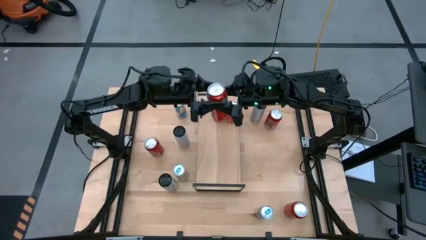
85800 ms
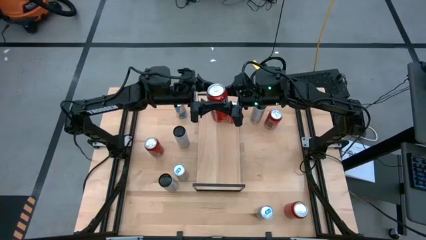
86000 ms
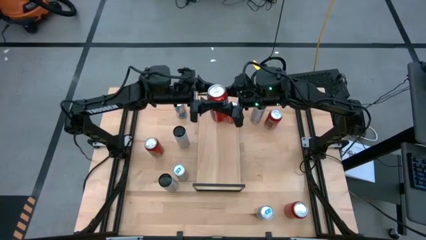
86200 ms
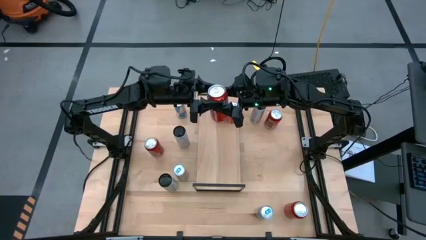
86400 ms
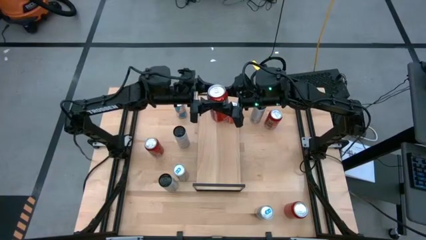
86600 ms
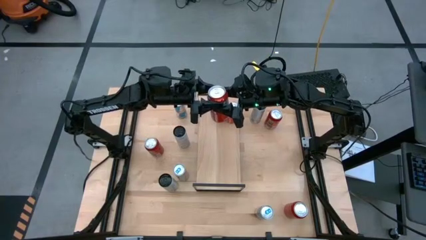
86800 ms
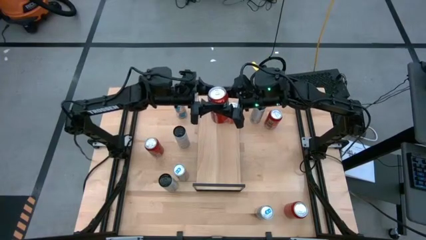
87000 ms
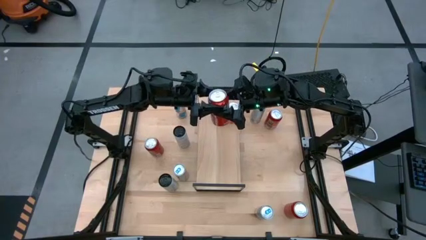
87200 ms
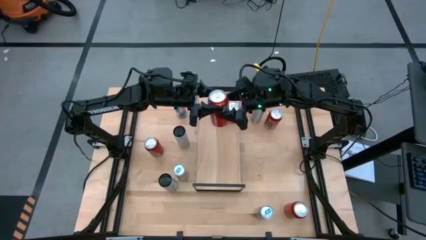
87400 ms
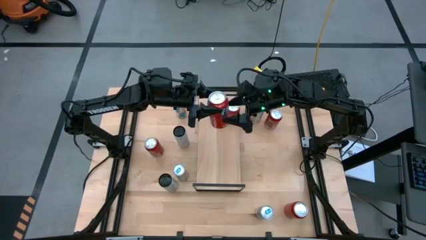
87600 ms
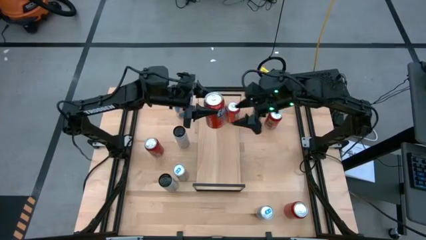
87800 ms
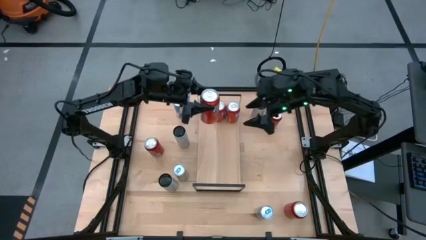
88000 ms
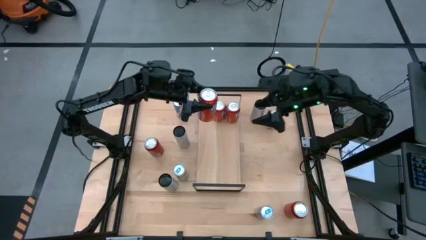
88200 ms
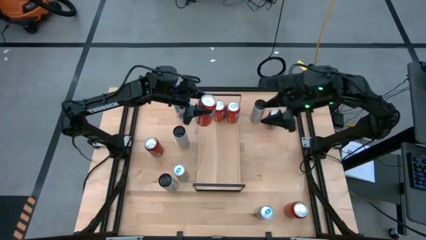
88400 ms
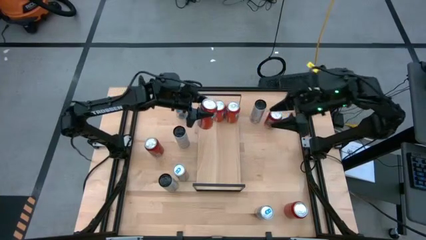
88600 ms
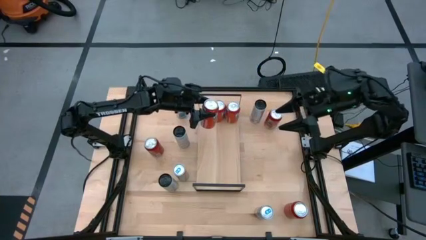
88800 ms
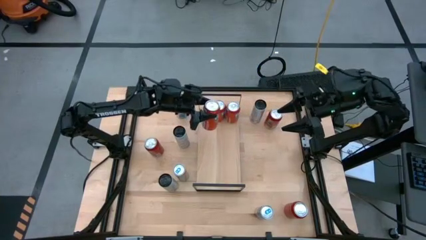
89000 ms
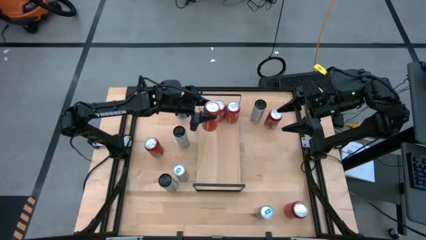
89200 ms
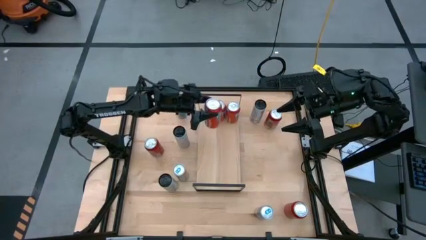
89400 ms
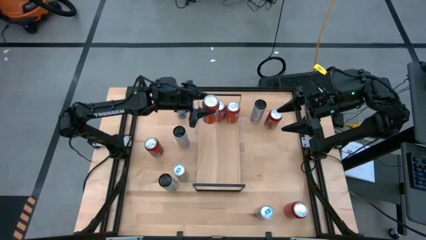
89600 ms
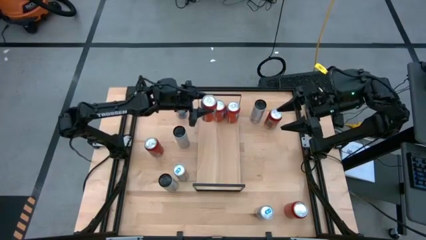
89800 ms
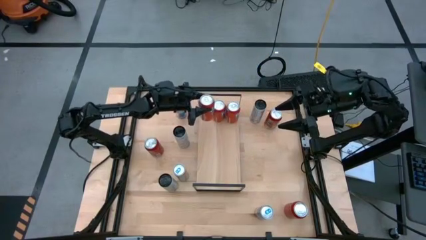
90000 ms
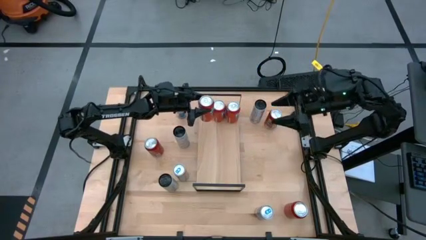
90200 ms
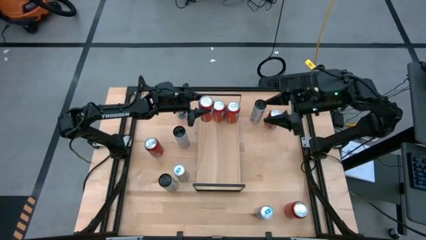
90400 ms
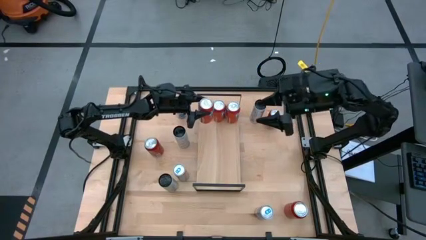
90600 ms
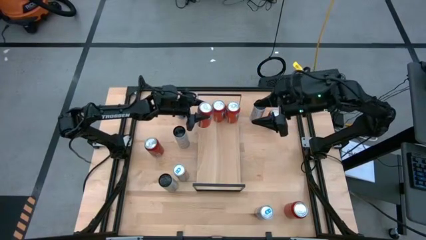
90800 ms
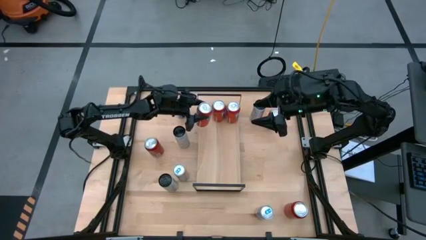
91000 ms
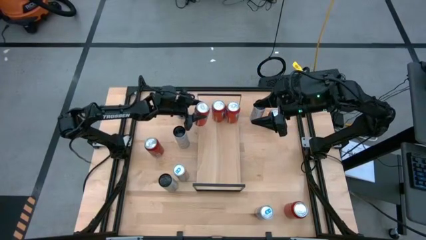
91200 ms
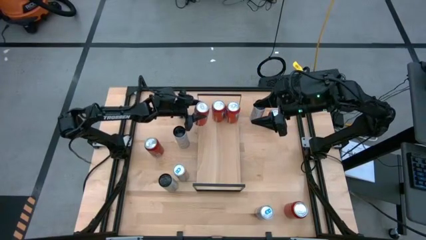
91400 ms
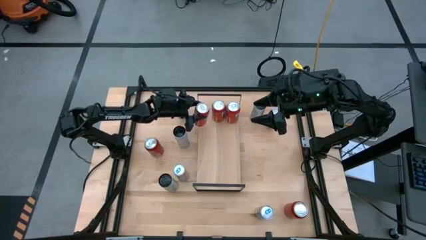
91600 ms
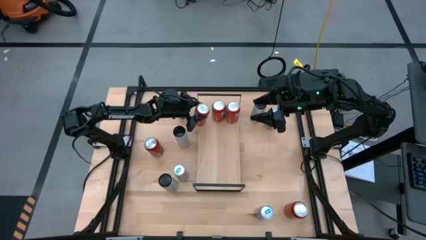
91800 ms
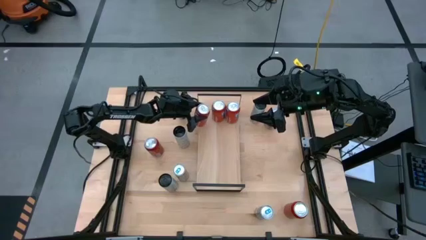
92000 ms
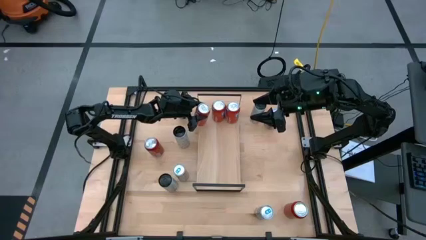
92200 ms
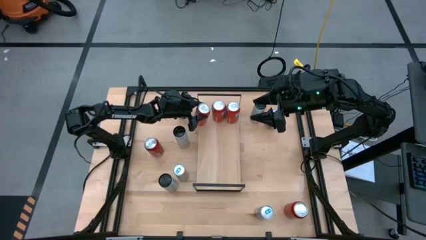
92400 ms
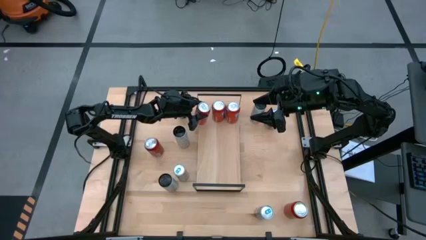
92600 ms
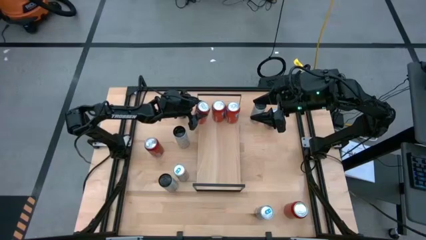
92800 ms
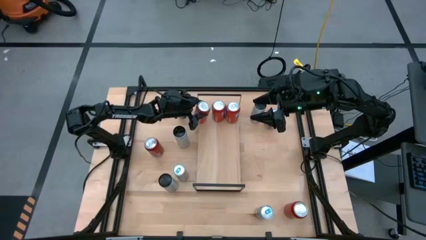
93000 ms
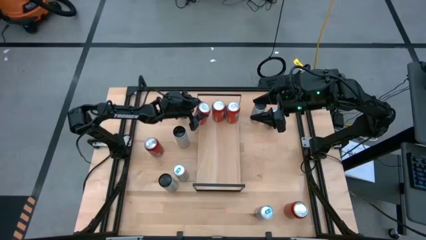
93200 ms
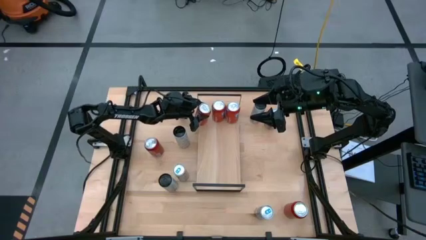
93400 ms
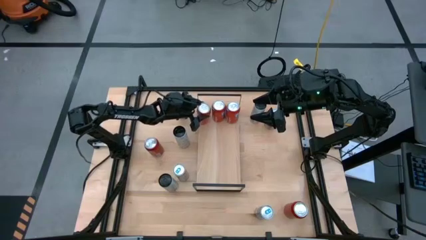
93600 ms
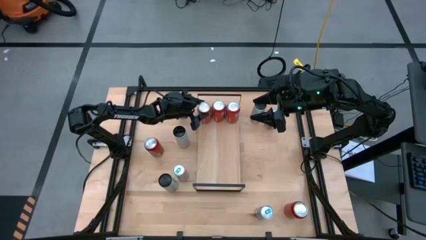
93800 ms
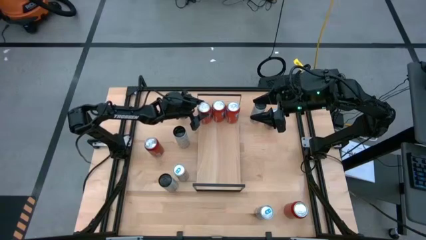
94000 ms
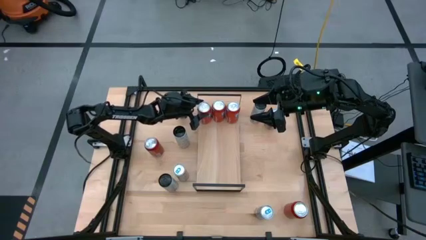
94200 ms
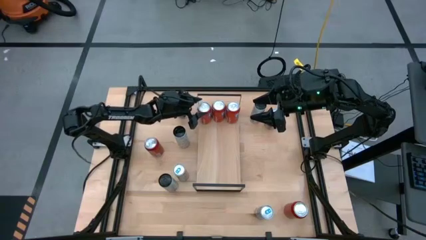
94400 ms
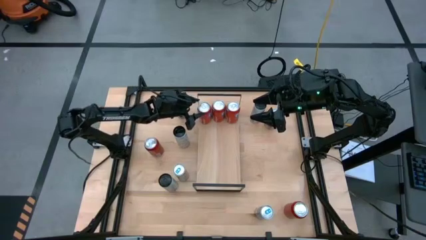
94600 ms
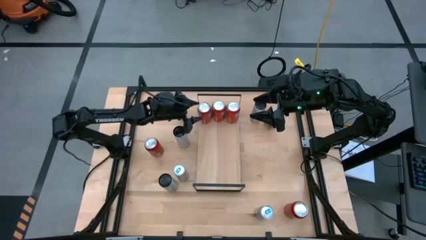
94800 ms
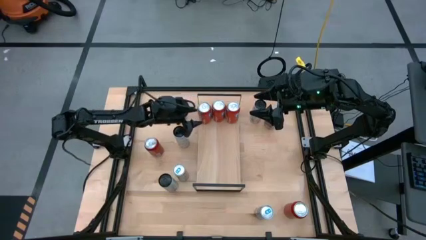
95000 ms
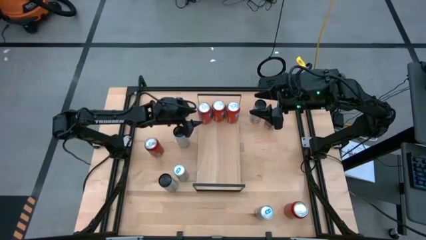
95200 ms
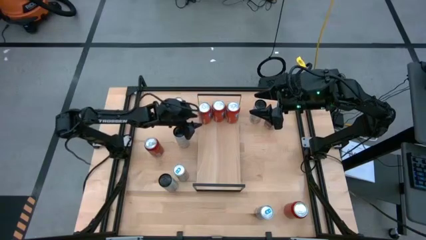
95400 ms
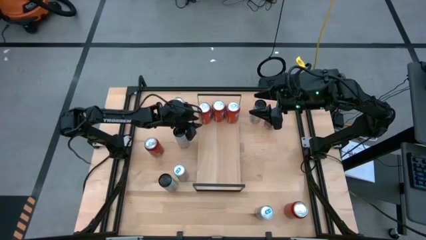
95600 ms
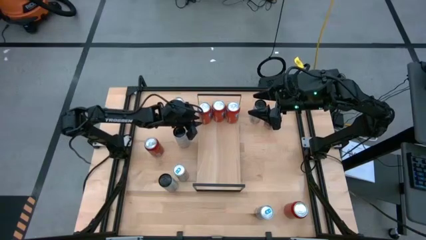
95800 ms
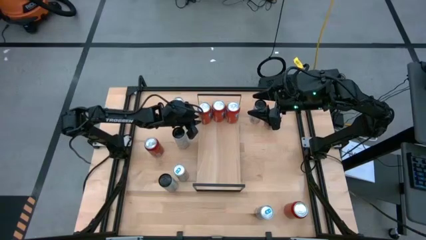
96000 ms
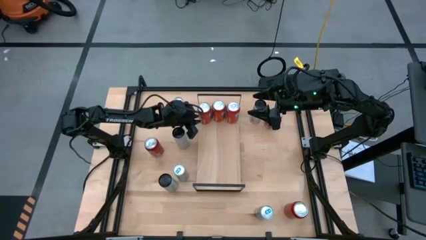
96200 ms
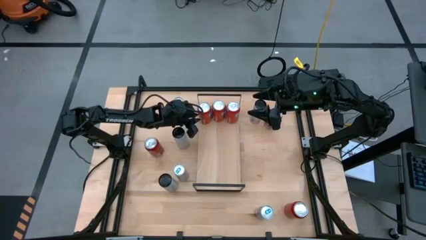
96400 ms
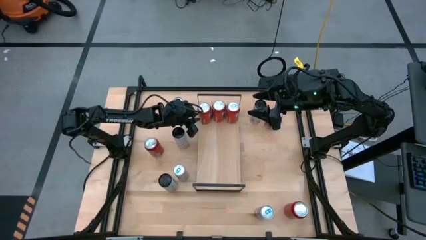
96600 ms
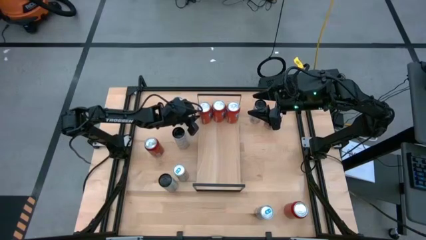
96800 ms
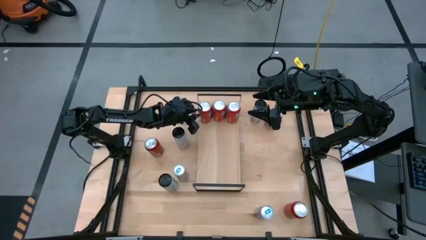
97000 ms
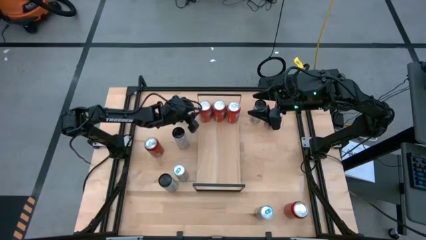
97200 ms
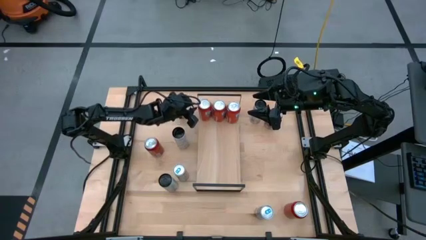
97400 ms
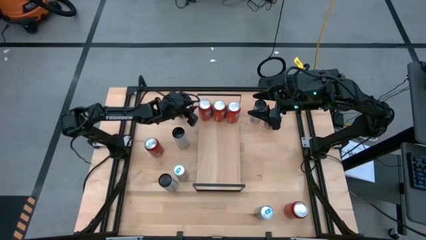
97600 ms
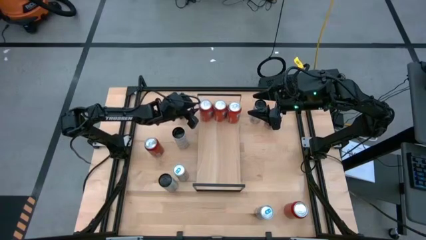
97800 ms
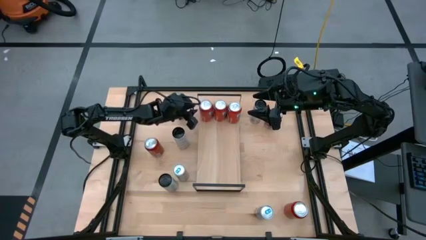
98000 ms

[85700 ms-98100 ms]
Task: Place canned beverage on shelf
Put the orange soda can on the shelf aligned with the other orange soda can

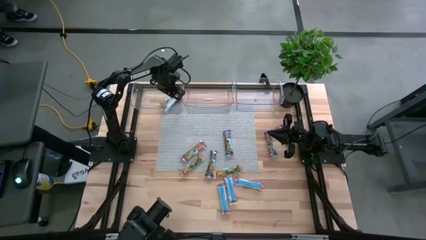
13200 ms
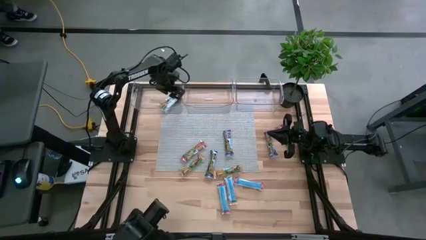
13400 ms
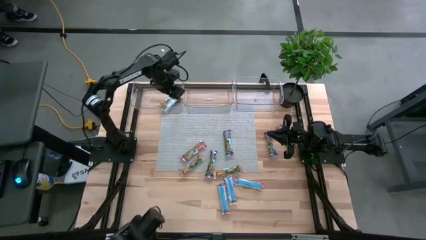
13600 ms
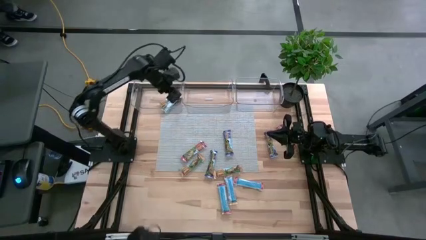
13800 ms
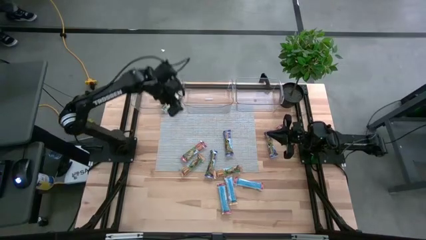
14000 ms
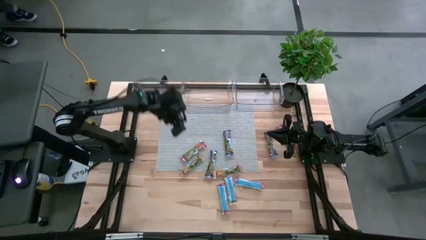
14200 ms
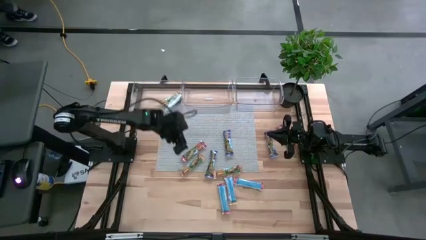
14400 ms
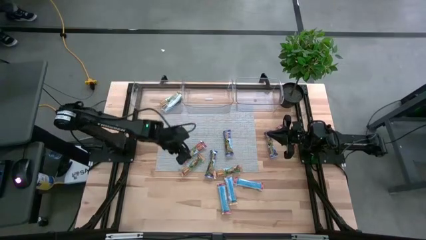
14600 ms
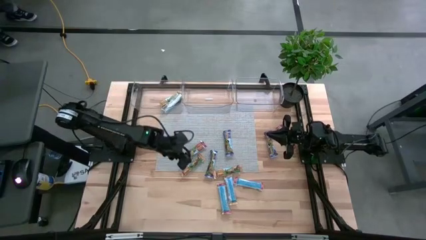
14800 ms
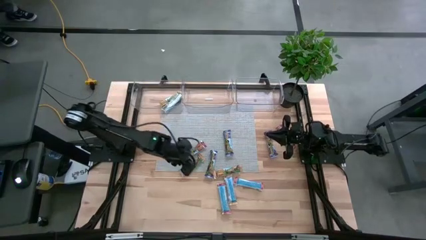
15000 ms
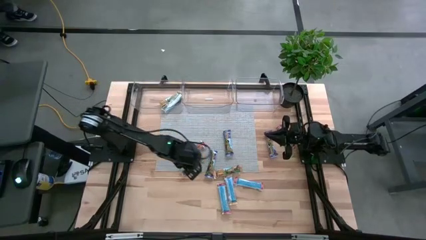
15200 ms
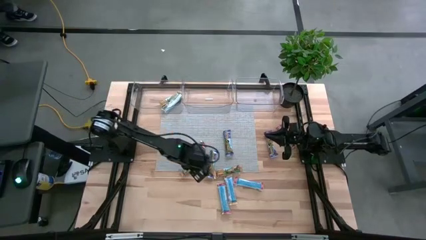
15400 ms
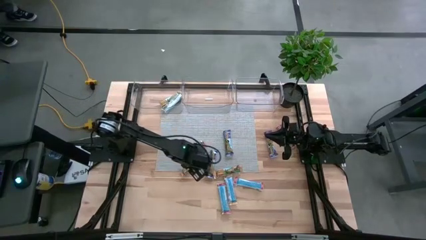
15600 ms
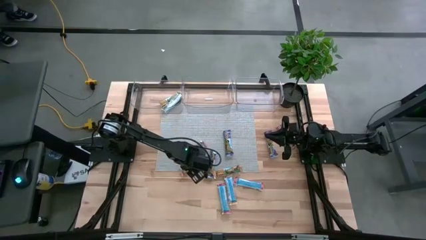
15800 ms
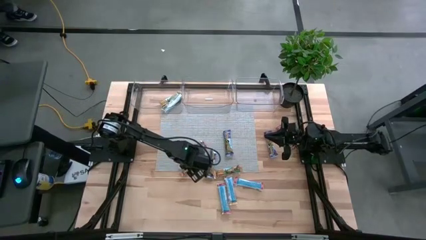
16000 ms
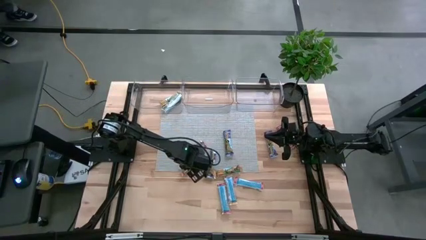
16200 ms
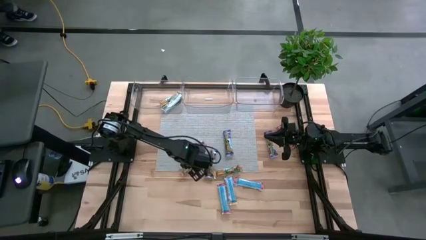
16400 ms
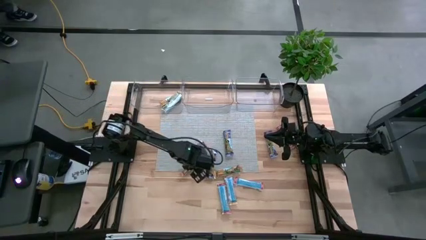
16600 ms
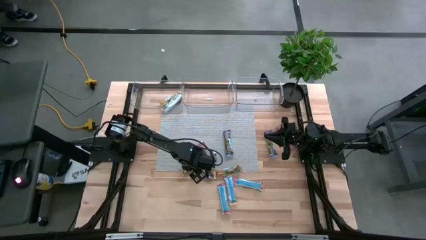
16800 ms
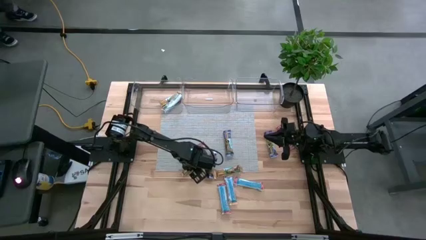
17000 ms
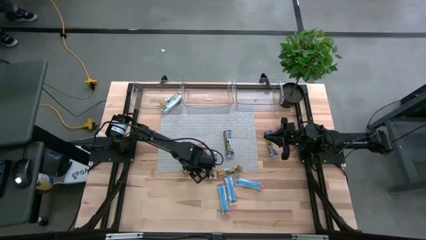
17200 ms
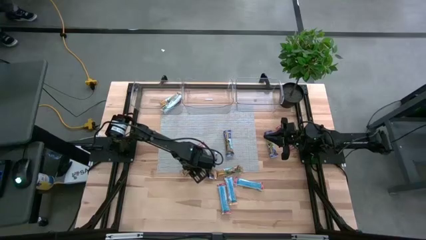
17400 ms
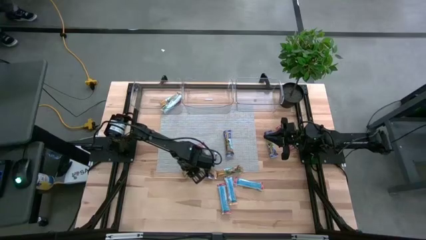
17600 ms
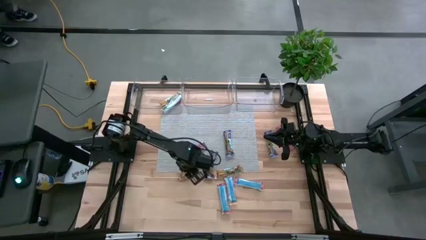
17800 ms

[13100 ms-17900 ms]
Task: Pick and place Granola Bars by type
Put the yellow granola bar into the left transparent bin
